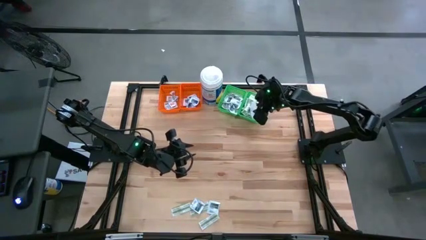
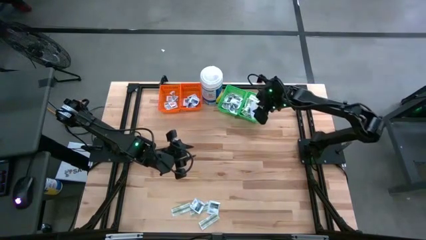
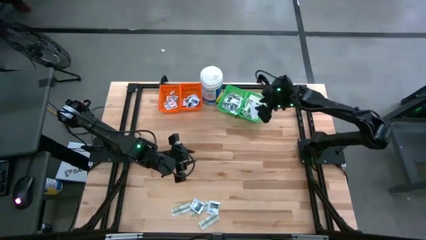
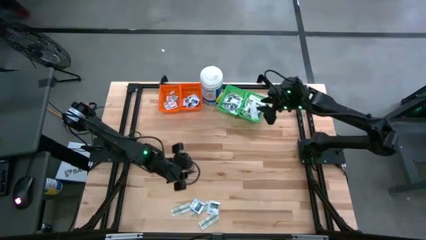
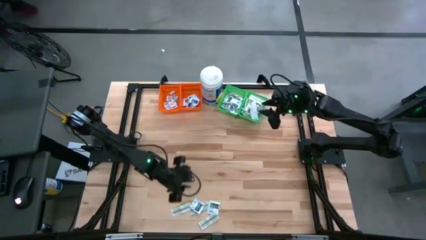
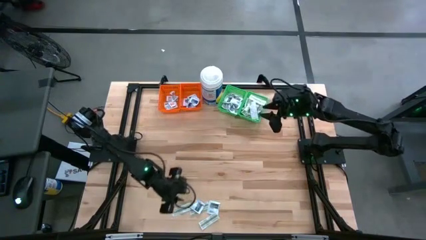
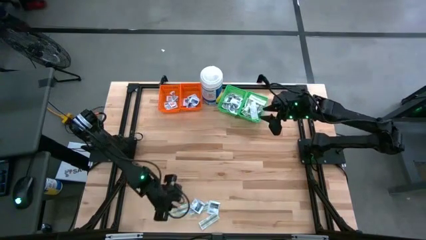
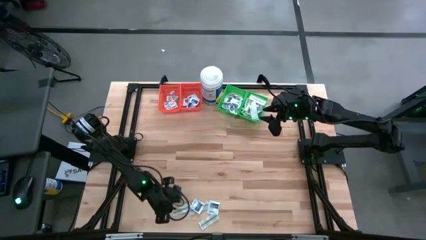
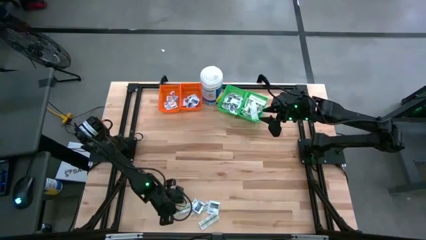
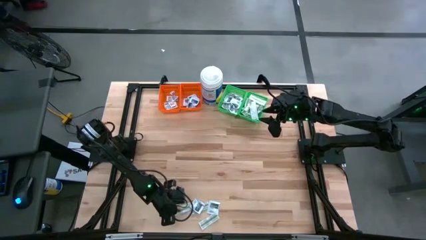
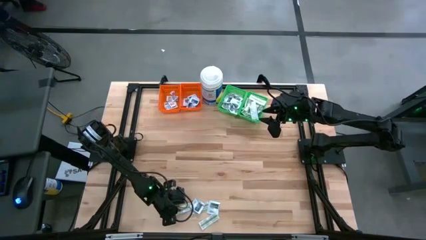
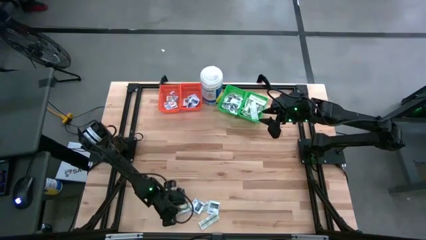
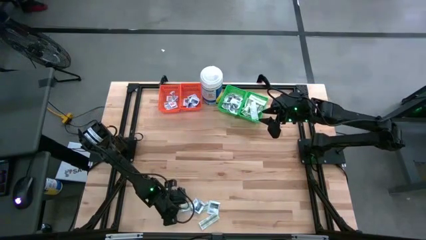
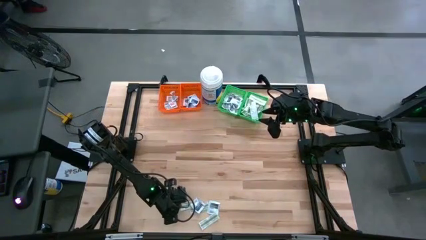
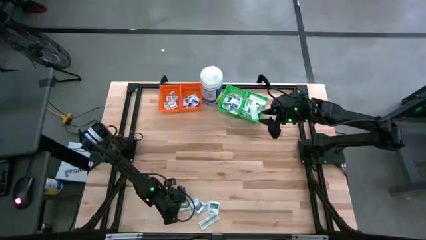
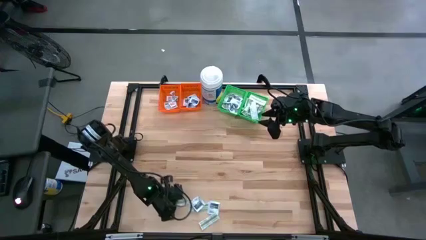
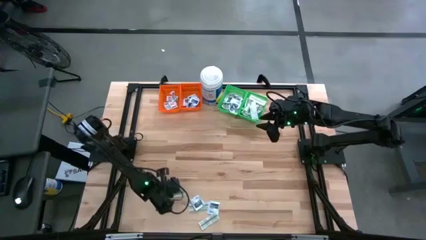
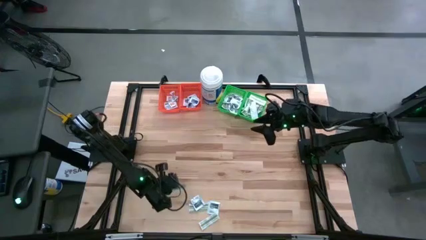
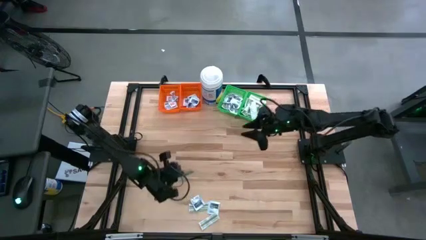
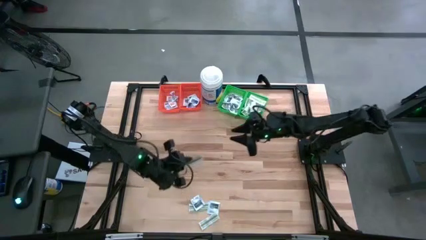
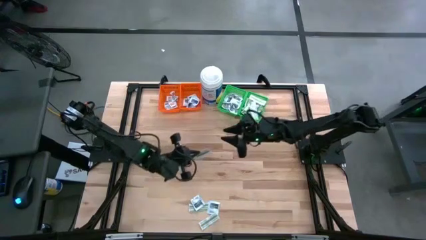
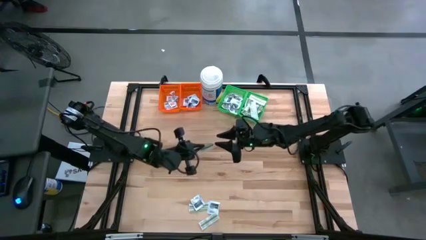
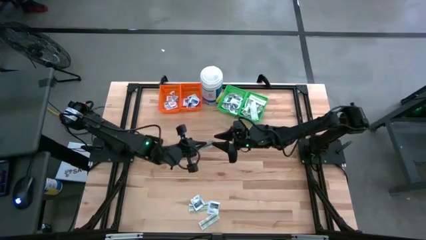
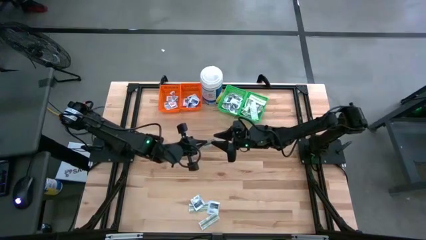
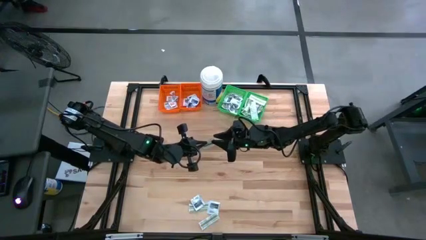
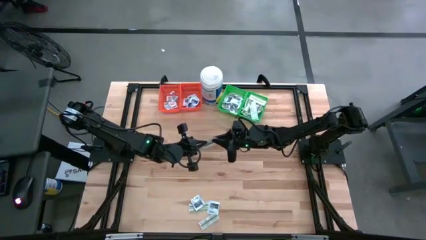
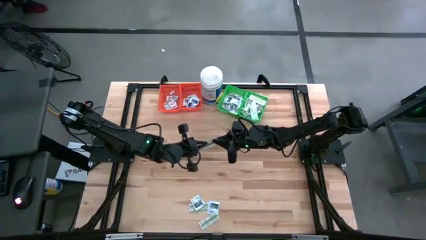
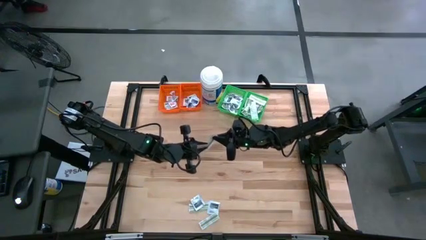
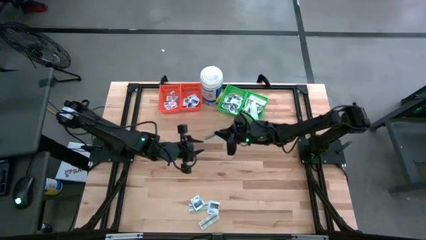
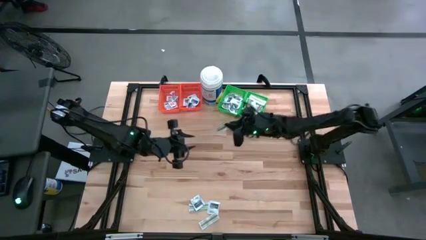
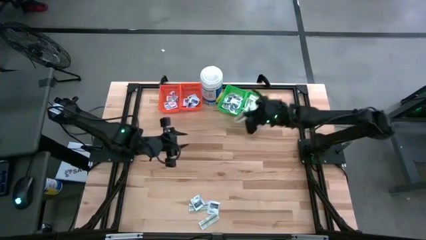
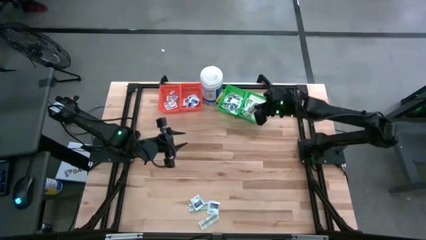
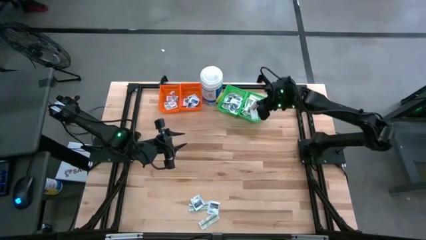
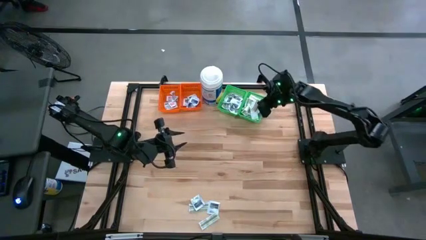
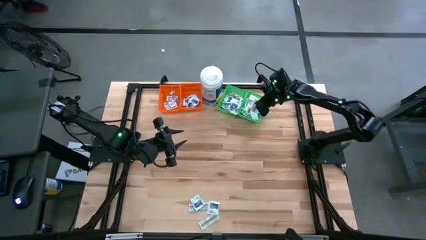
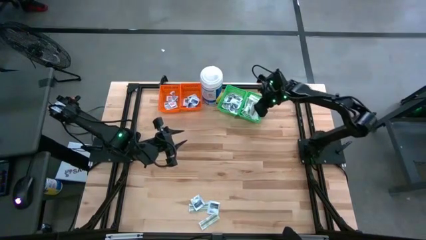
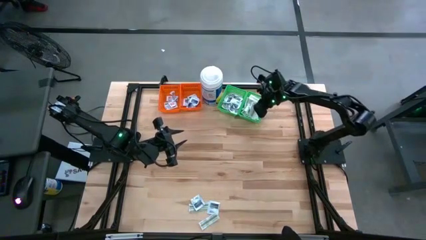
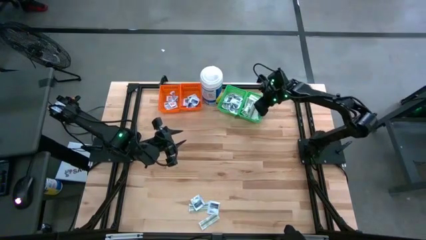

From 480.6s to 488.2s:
Task: Pick & Place First Aid Supplies
Put the green bandage pack into the right green bin

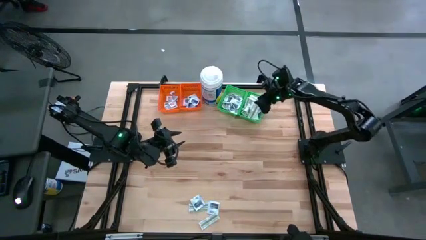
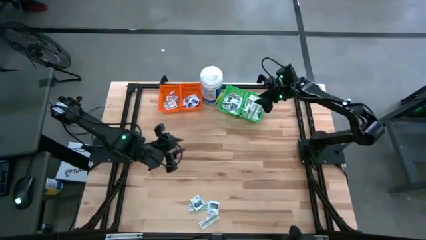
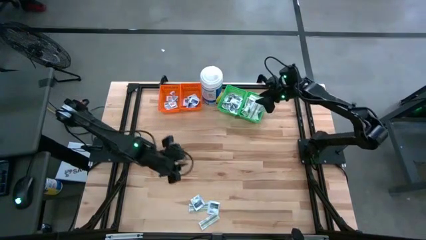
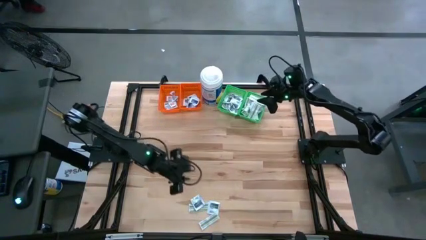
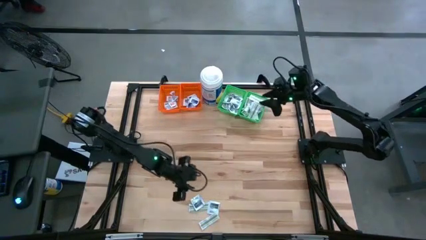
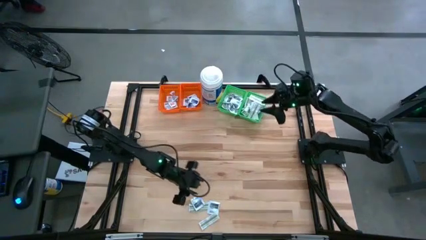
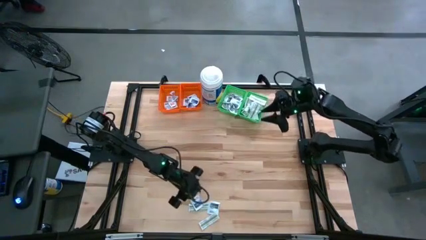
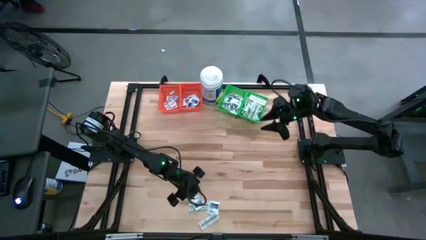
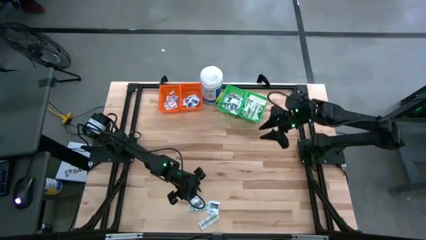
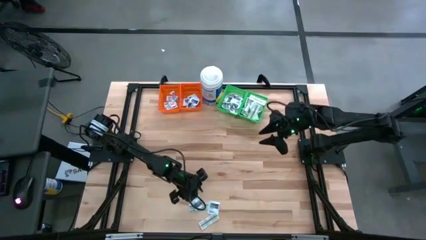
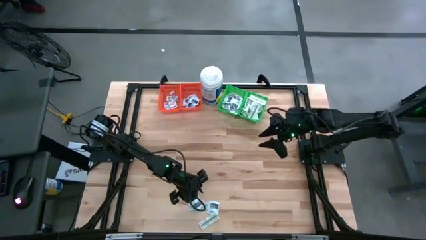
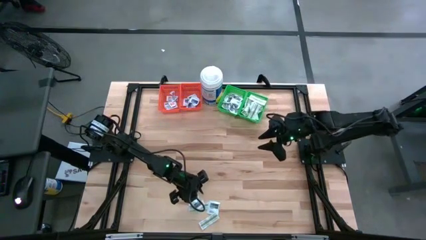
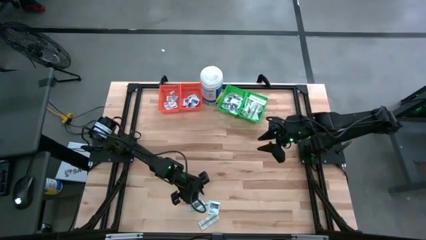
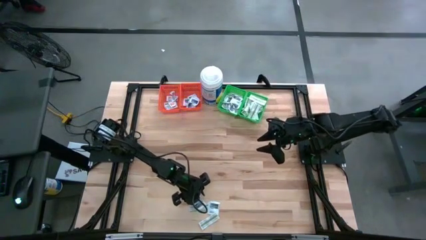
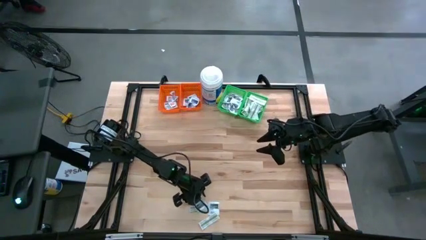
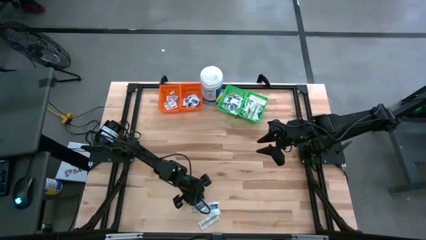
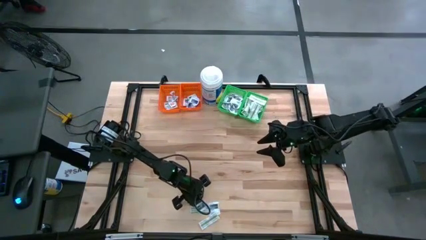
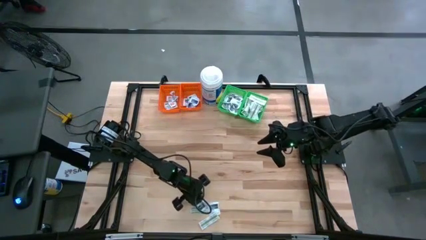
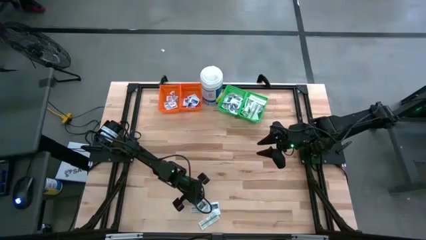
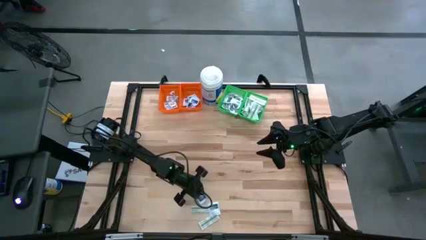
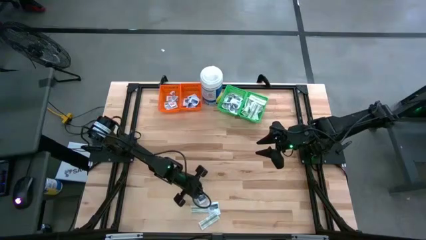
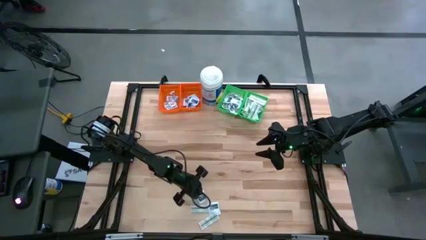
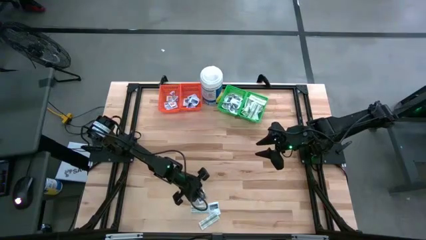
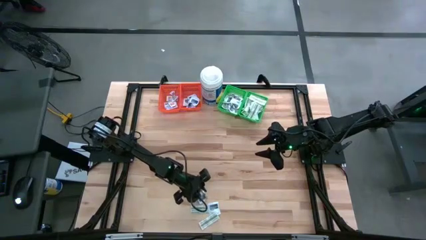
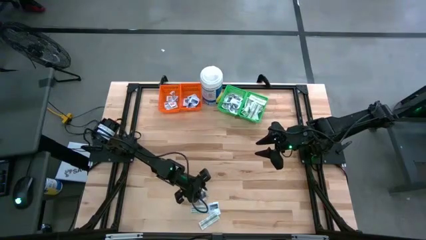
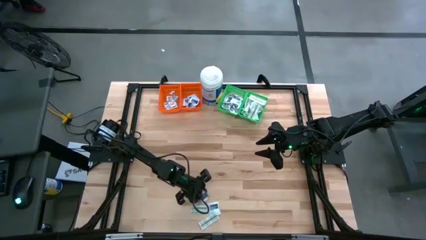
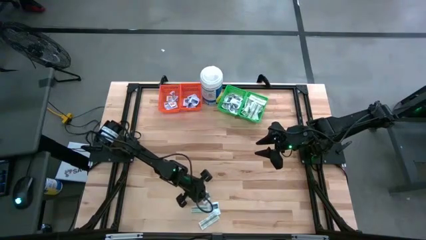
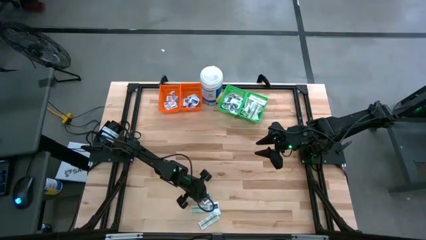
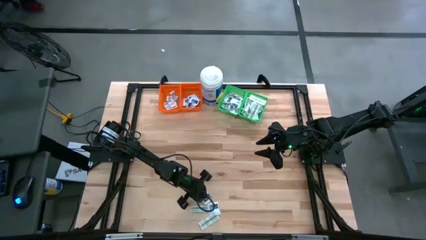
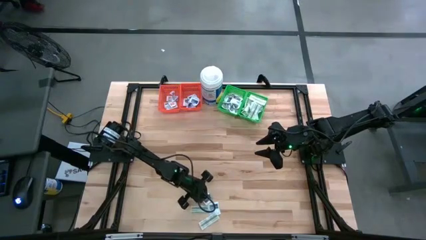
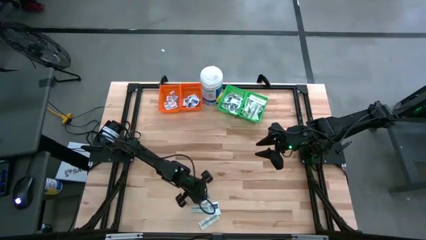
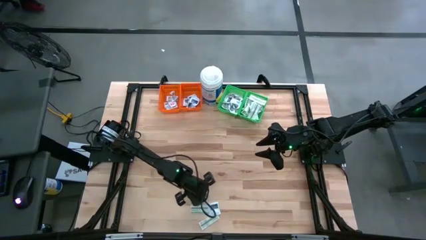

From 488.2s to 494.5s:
Put the black towelette pack into the left green bin
